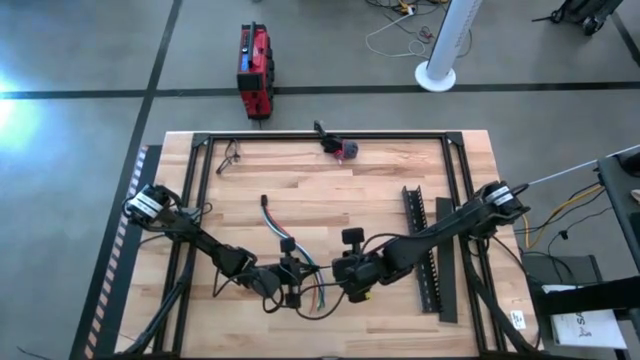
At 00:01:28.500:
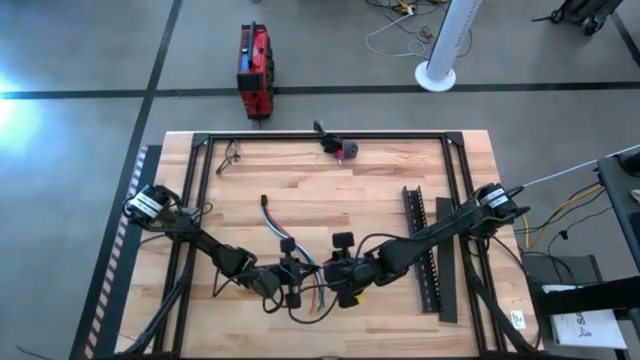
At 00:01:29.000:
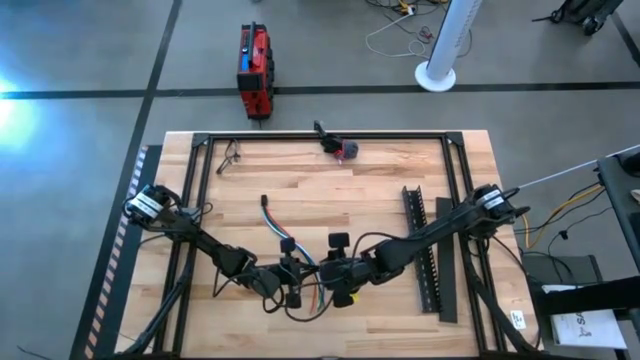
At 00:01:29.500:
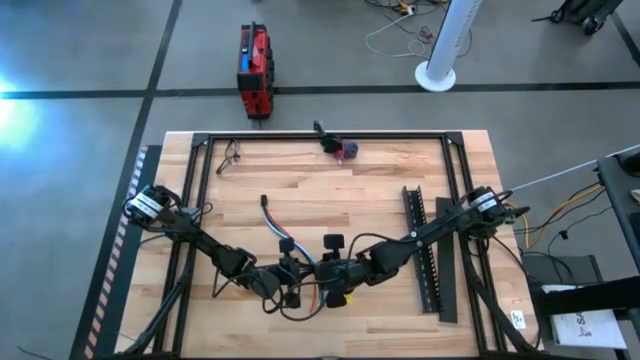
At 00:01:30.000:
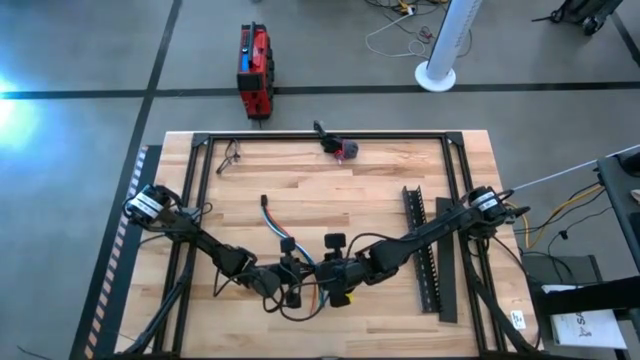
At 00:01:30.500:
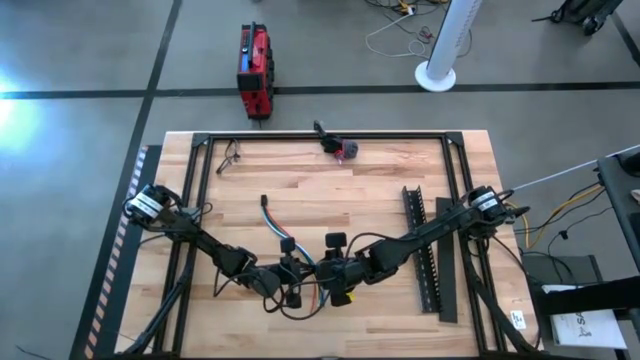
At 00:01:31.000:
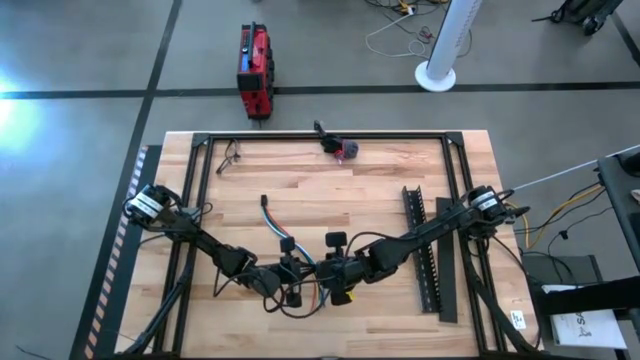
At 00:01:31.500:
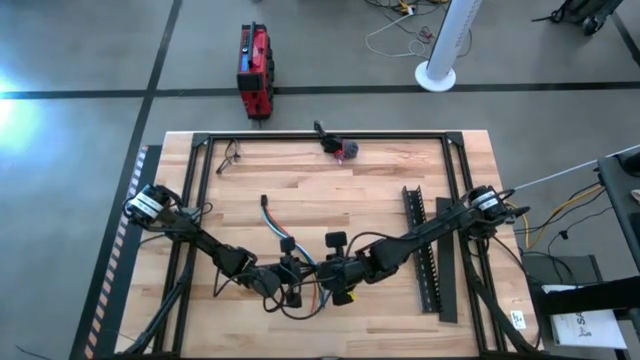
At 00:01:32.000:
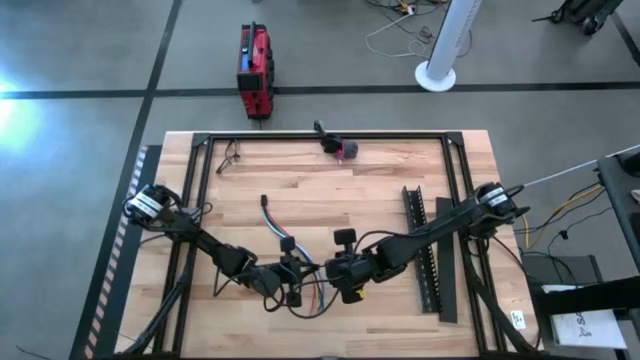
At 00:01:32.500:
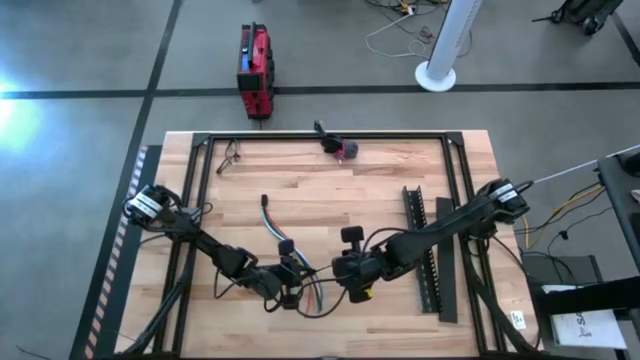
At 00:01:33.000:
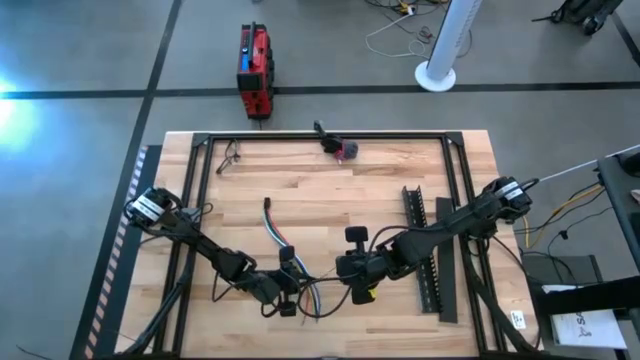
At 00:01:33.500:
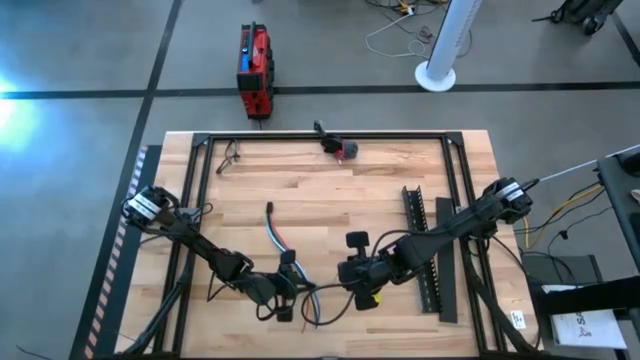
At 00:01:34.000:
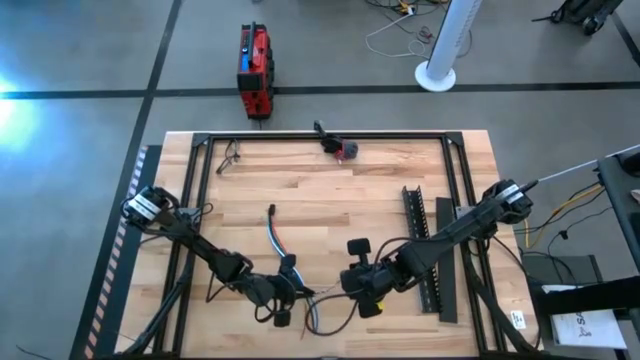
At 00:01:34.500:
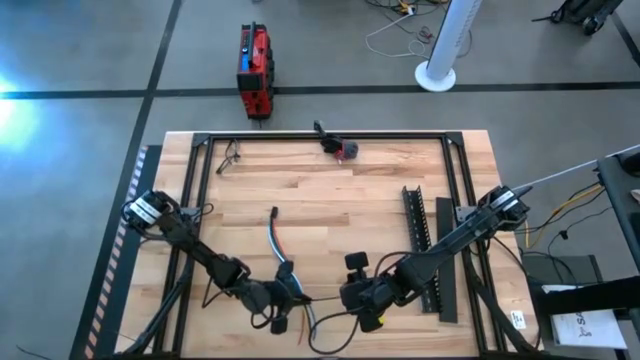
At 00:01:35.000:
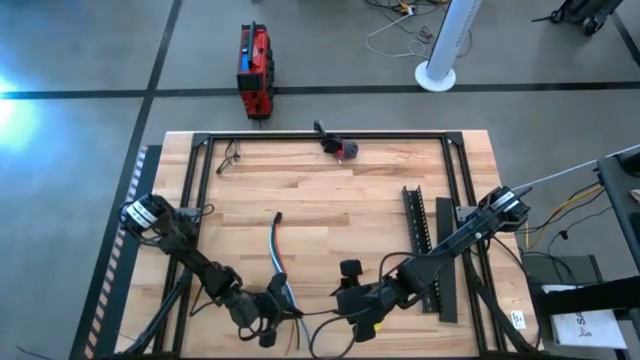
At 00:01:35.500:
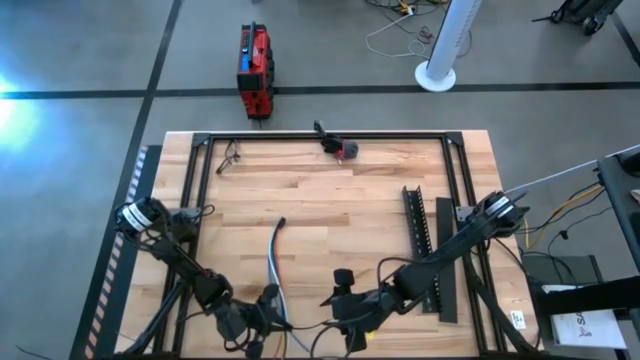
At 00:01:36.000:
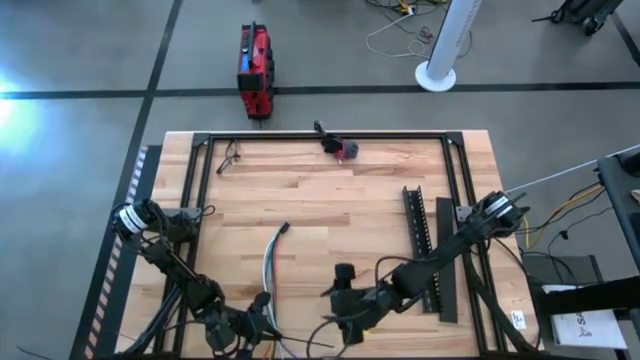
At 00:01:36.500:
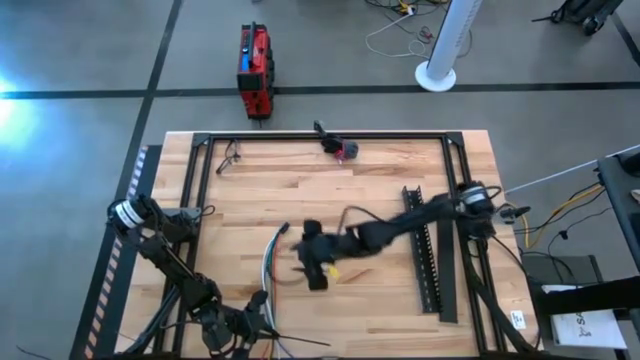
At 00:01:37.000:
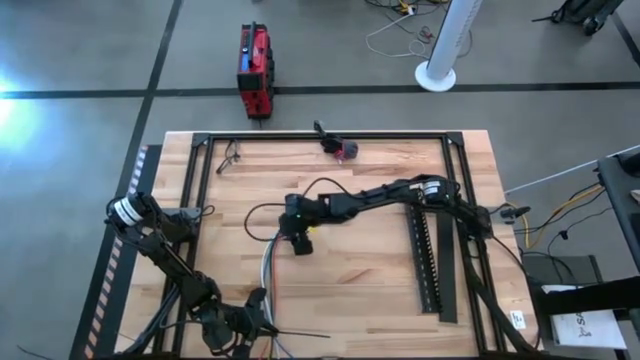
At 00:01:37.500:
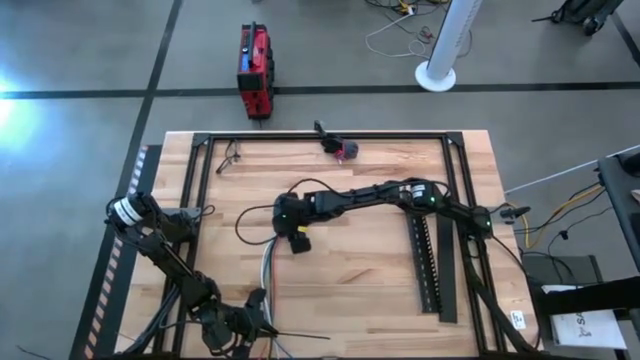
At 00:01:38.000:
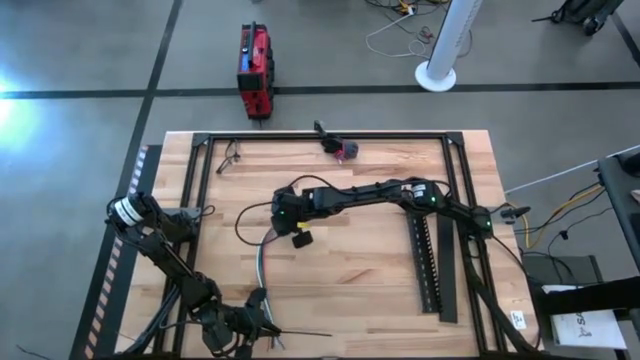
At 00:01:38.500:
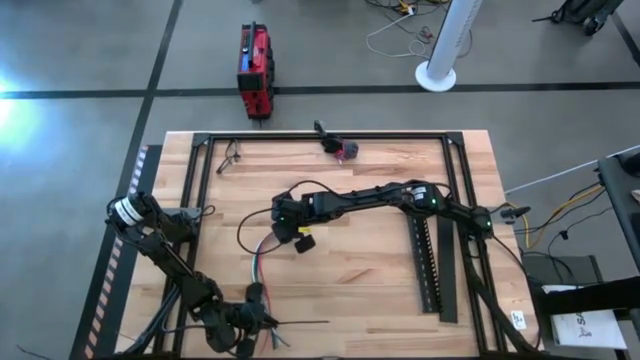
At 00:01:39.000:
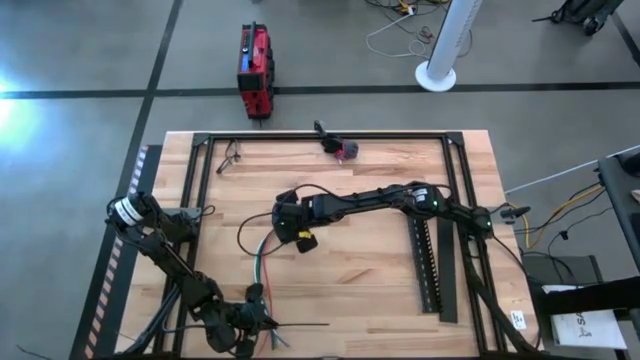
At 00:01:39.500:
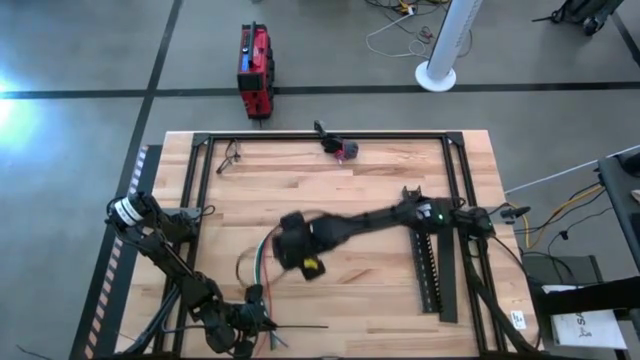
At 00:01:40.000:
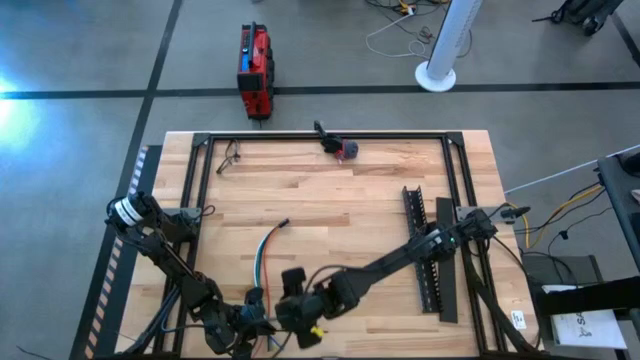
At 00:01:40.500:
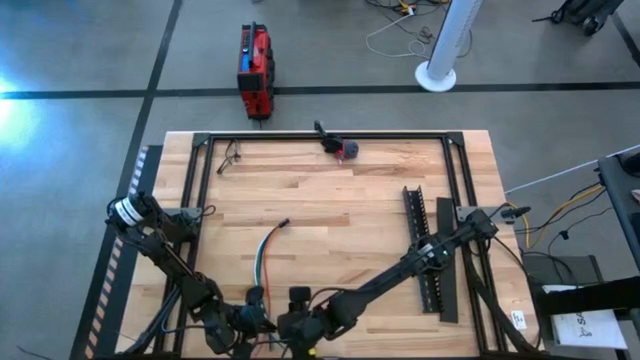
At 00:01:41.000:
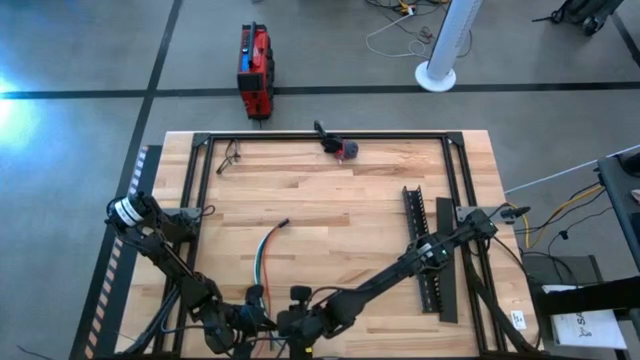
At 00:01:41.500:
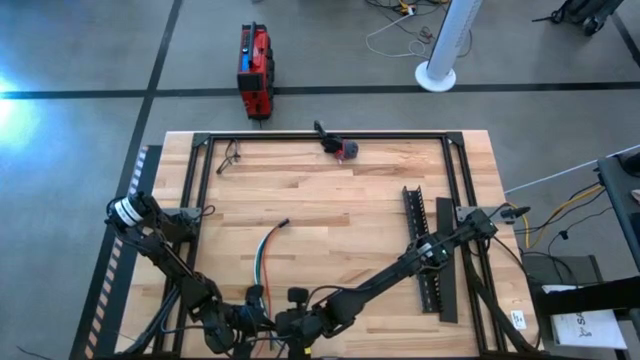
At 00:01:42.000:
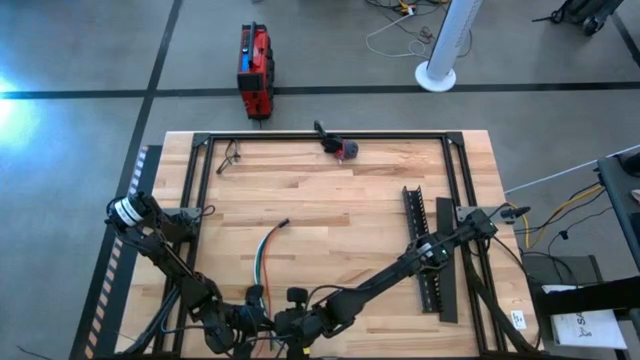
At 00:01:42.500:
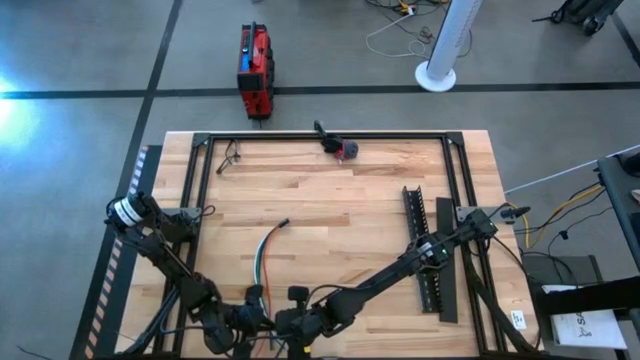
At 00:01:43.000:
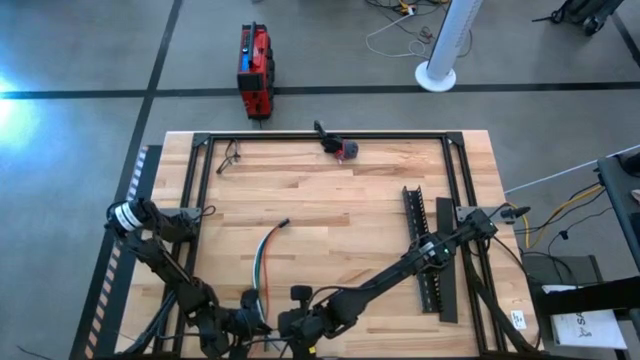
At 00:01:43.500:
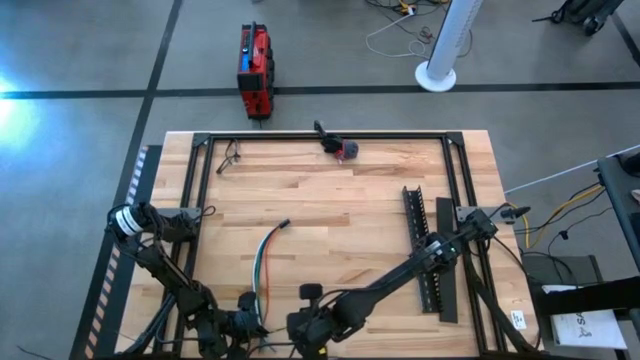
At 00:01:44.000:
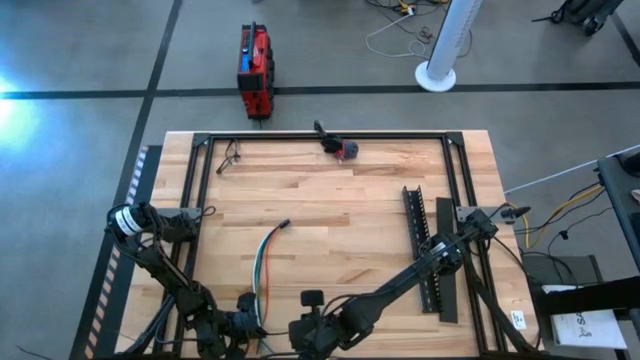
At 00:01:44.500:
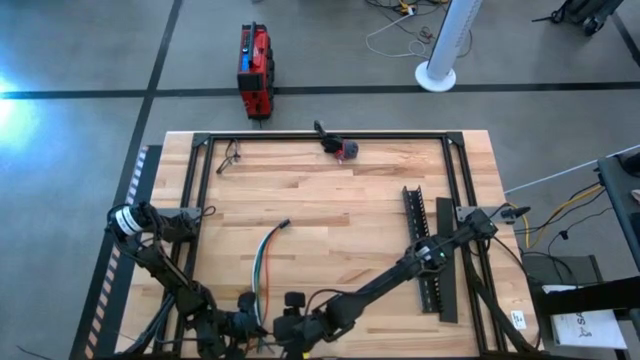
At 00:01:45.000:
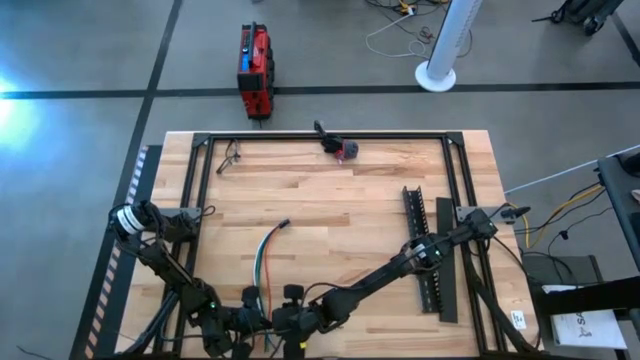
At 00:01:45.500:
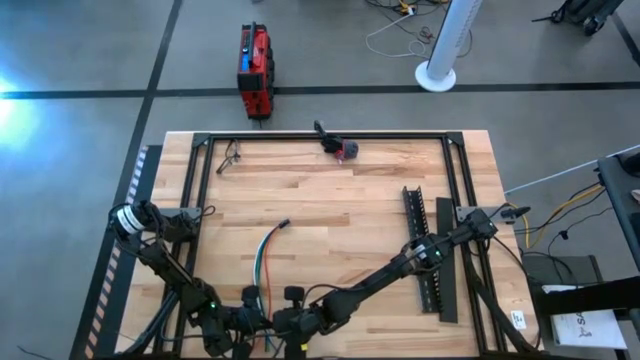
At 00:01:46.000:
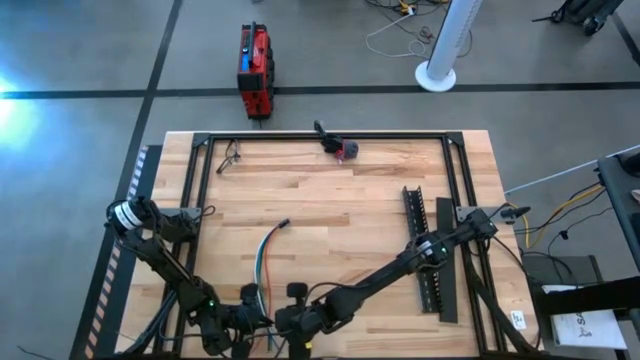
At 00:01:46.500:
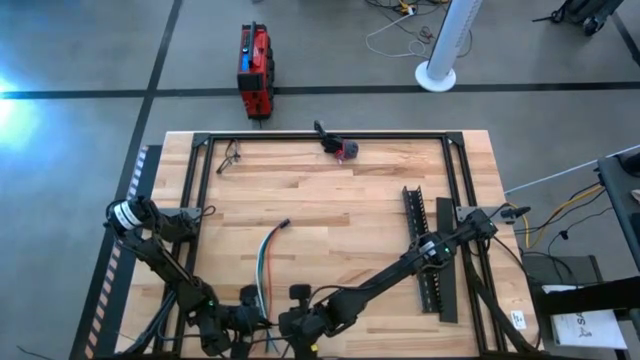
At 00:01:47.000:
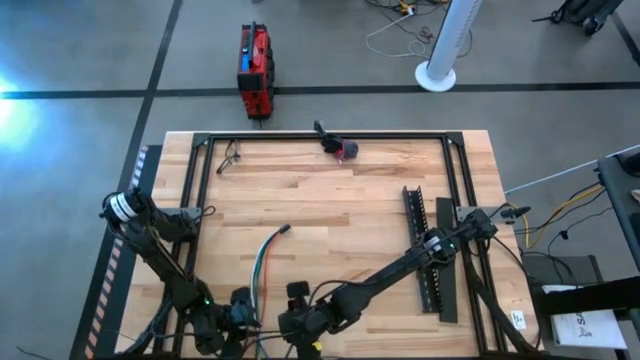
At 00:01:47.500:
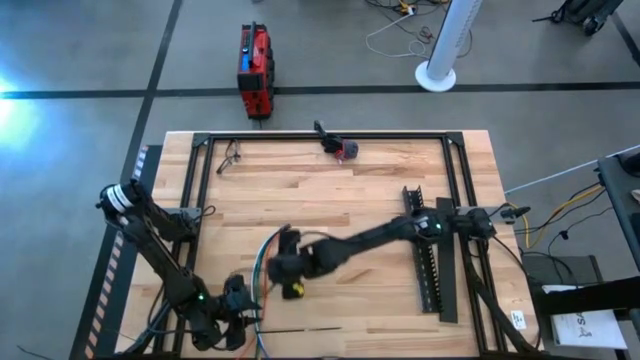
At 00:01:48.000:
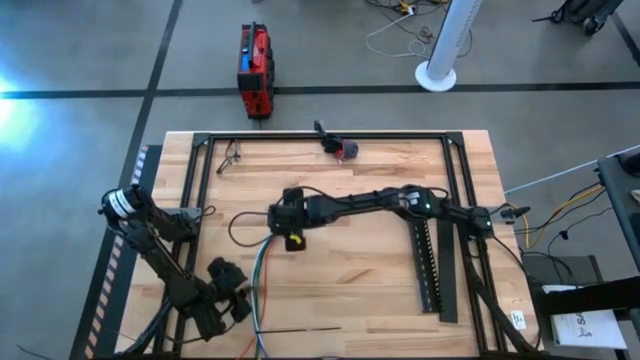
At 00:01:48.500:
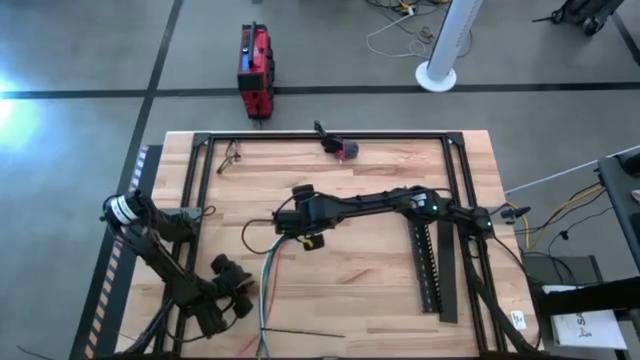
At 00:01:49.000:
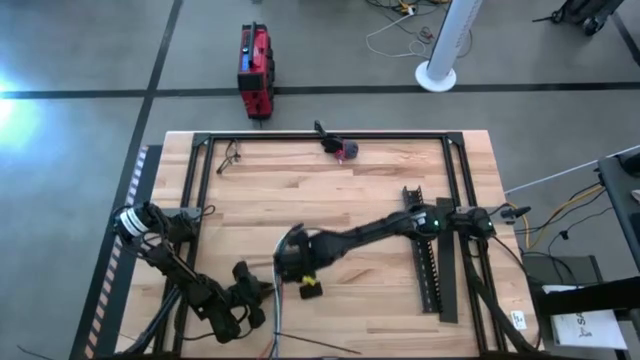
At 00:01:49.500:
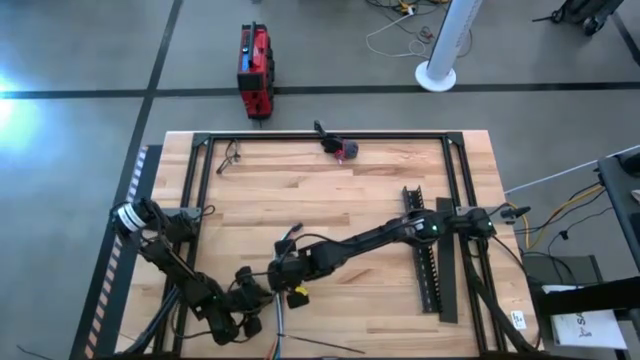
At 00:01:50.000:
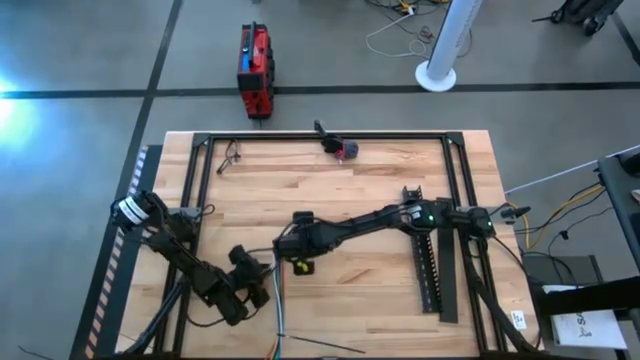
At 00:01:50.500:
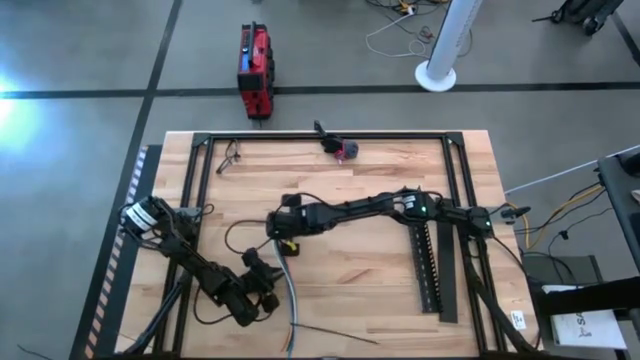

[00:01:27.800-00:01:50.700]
Task: Ziptie cables
Close the cables together using a zip tie
